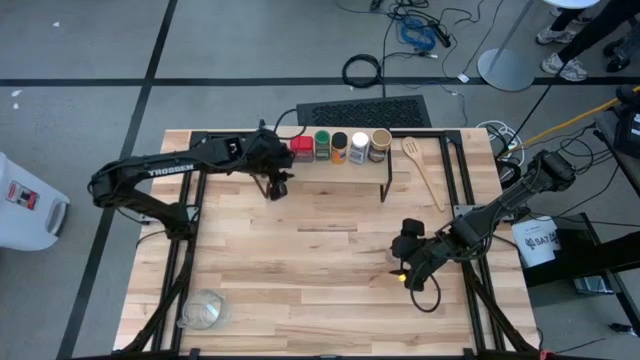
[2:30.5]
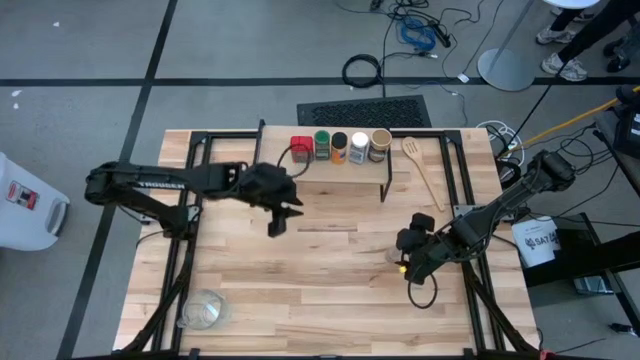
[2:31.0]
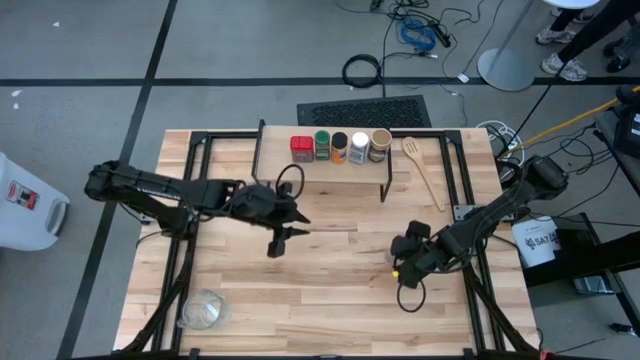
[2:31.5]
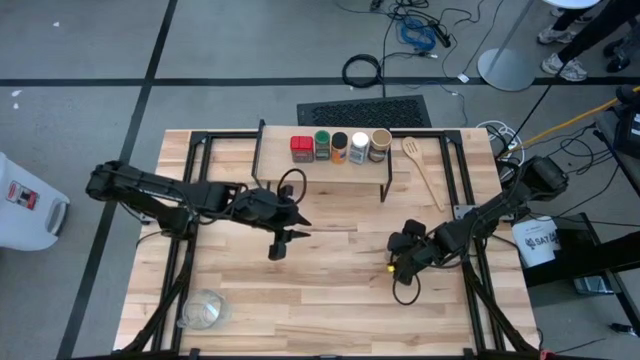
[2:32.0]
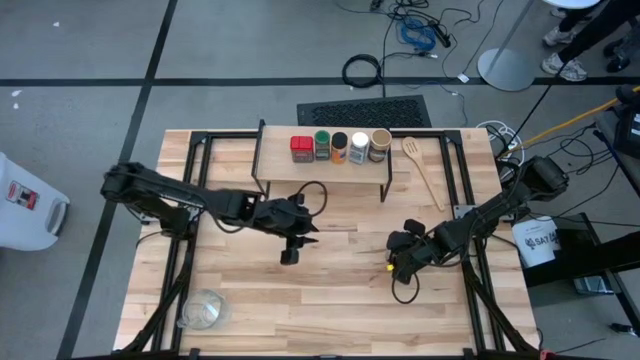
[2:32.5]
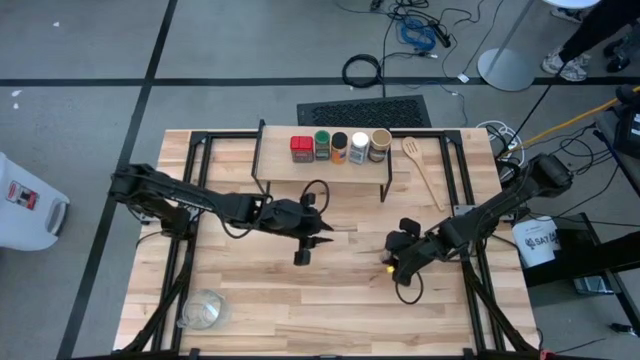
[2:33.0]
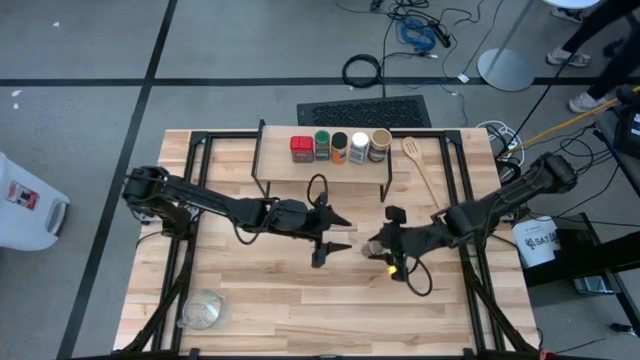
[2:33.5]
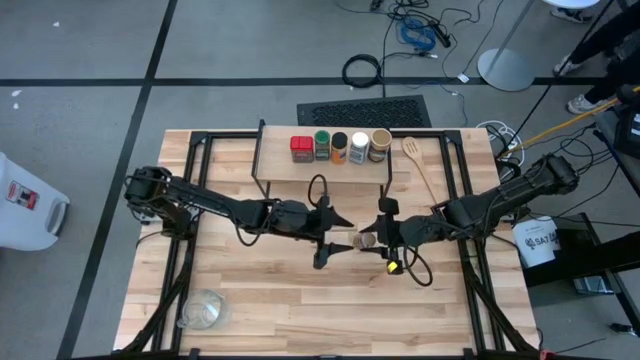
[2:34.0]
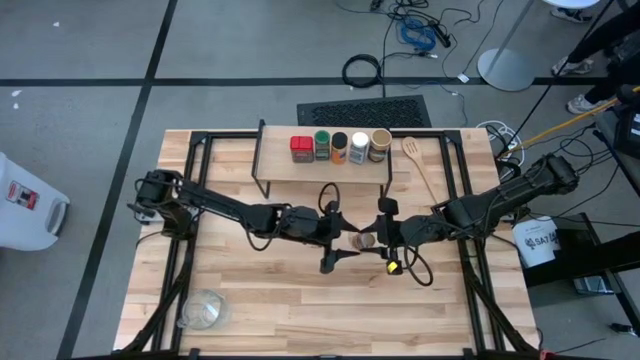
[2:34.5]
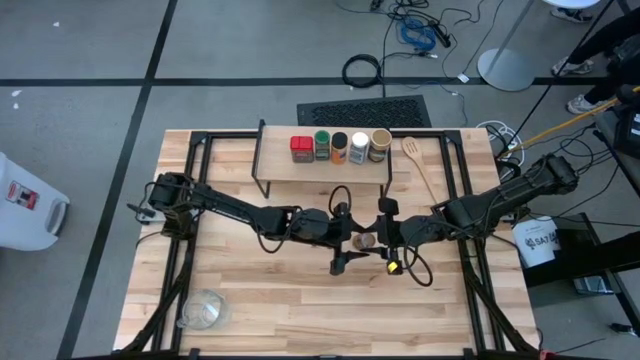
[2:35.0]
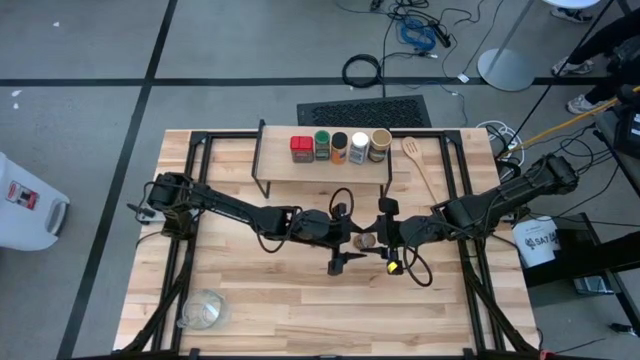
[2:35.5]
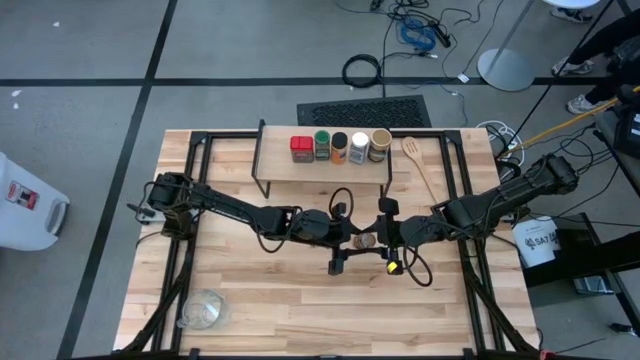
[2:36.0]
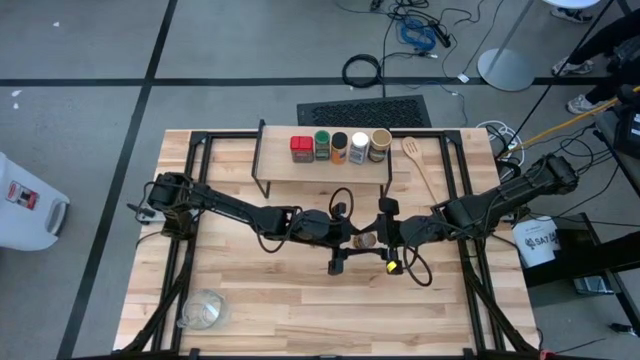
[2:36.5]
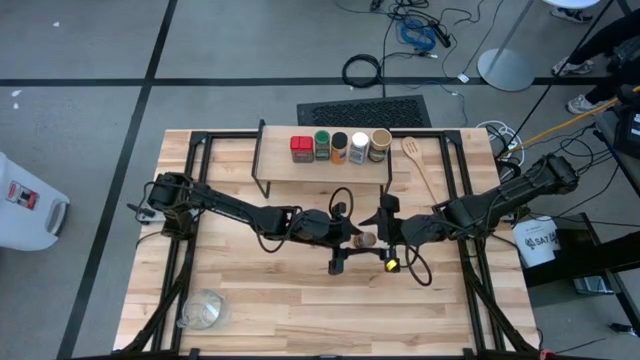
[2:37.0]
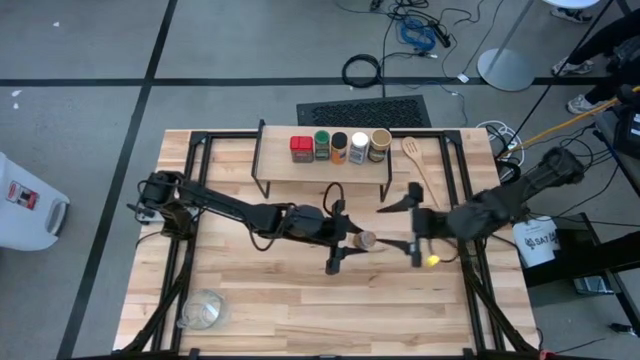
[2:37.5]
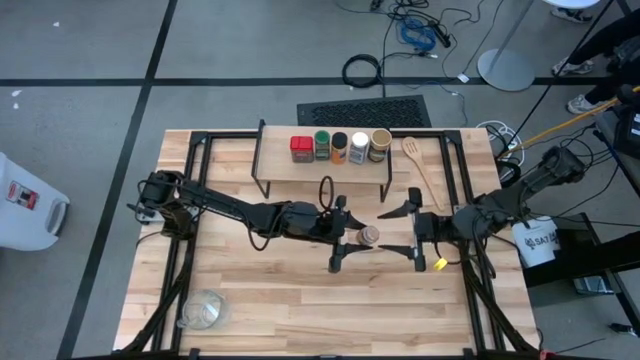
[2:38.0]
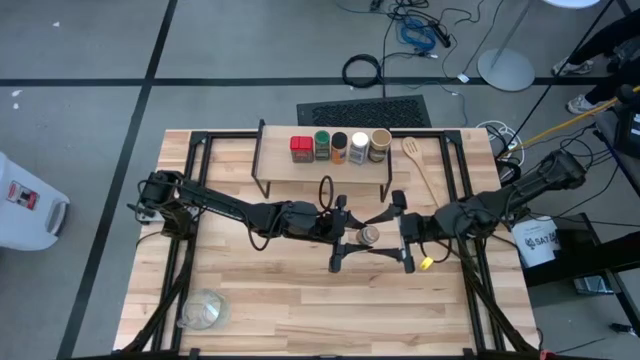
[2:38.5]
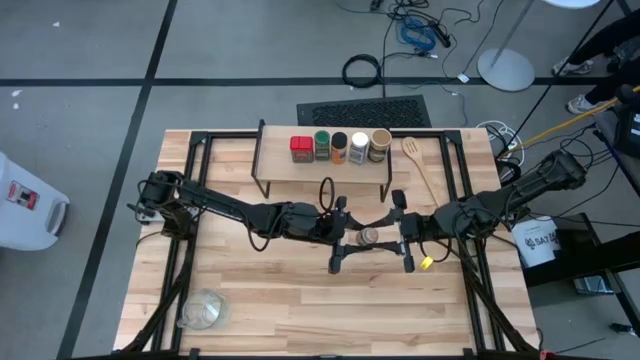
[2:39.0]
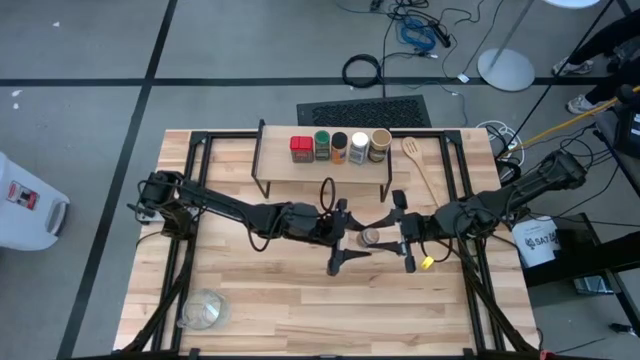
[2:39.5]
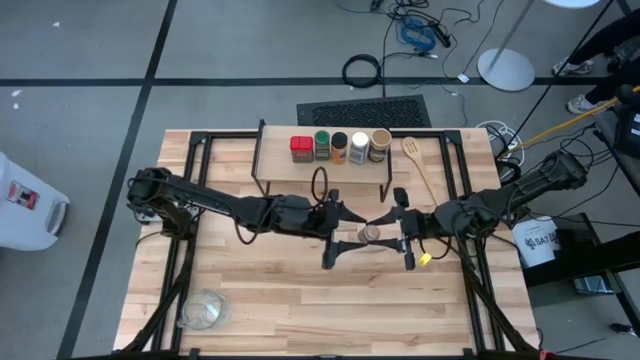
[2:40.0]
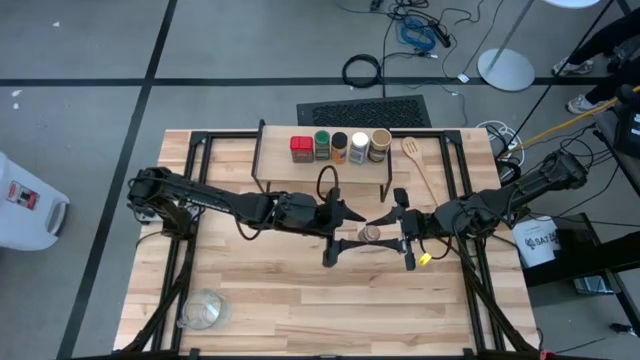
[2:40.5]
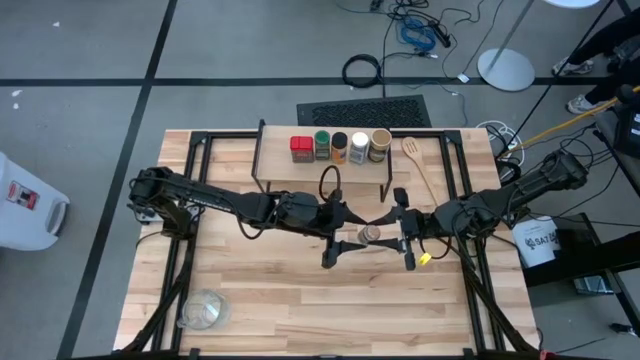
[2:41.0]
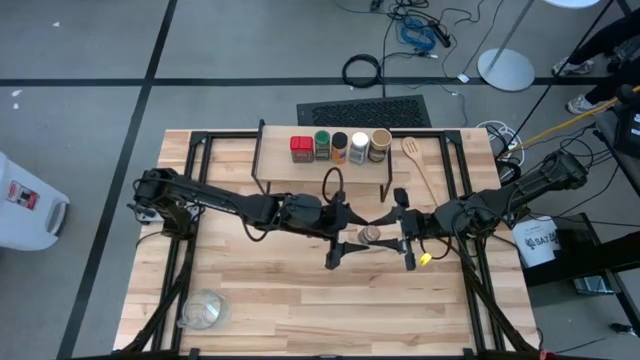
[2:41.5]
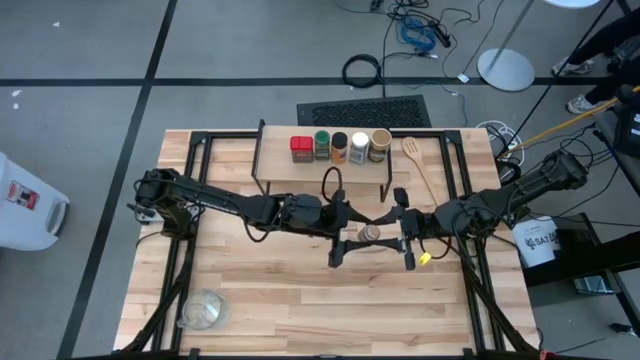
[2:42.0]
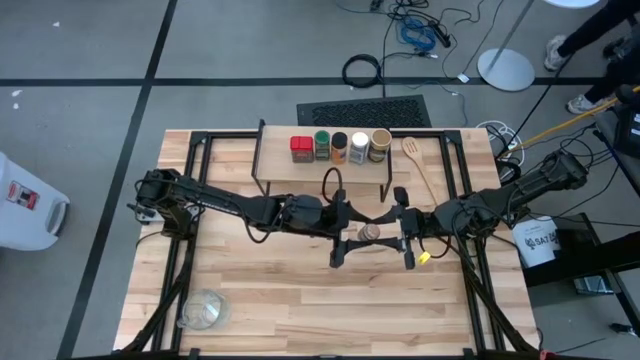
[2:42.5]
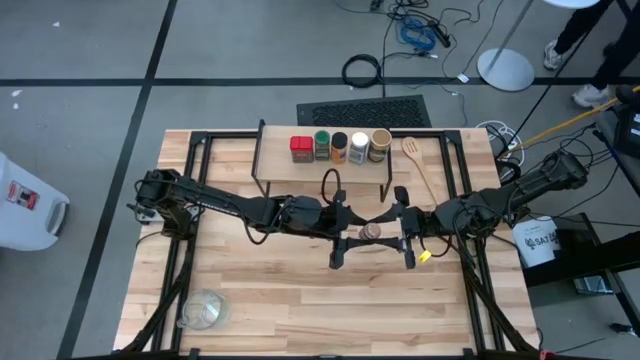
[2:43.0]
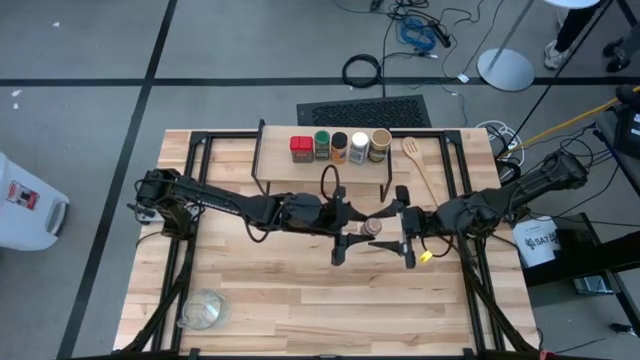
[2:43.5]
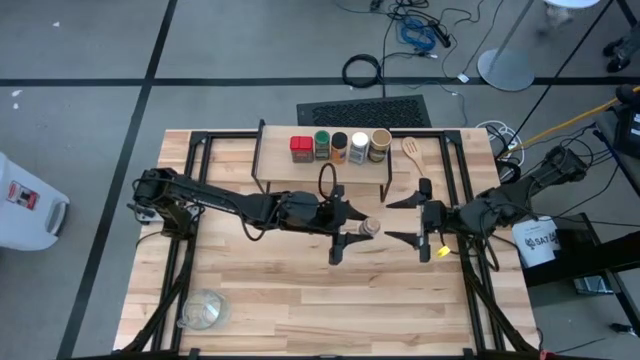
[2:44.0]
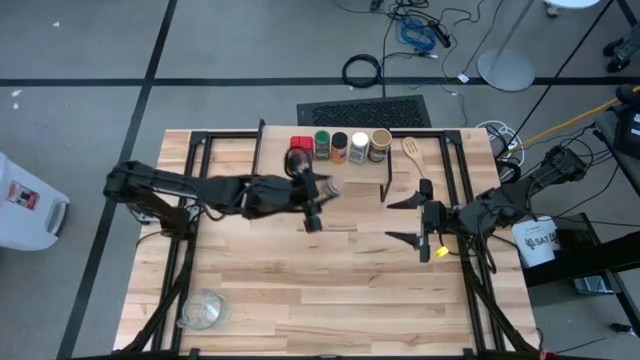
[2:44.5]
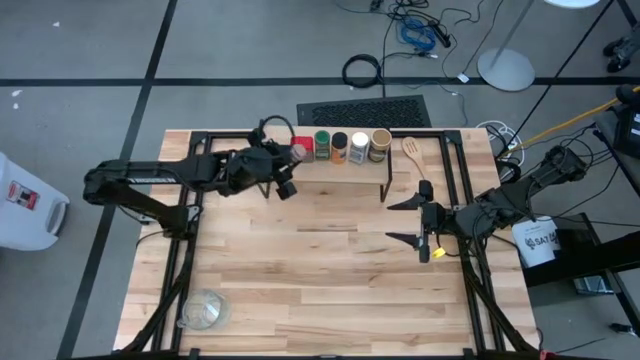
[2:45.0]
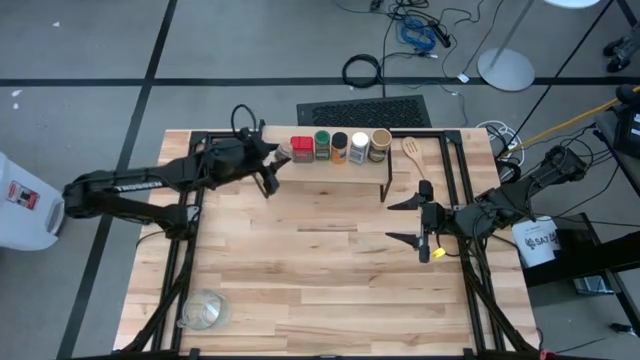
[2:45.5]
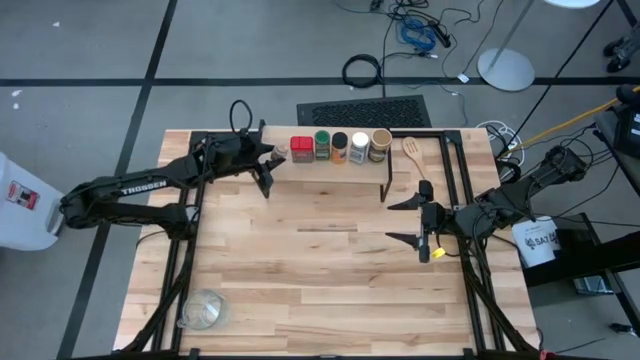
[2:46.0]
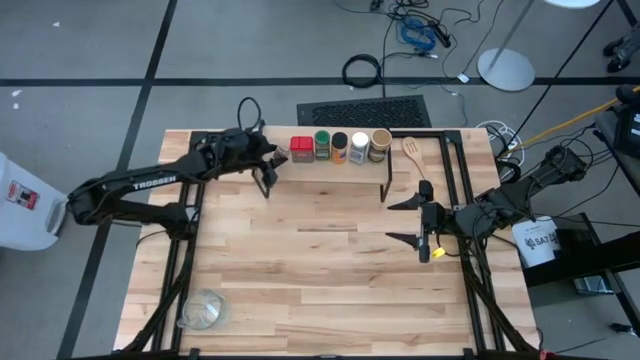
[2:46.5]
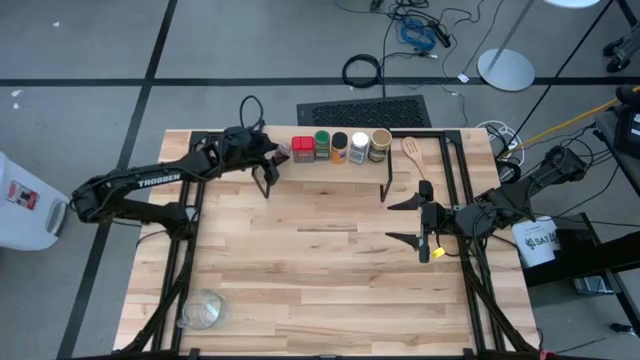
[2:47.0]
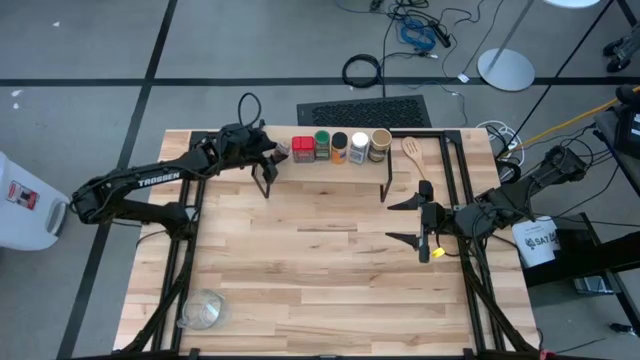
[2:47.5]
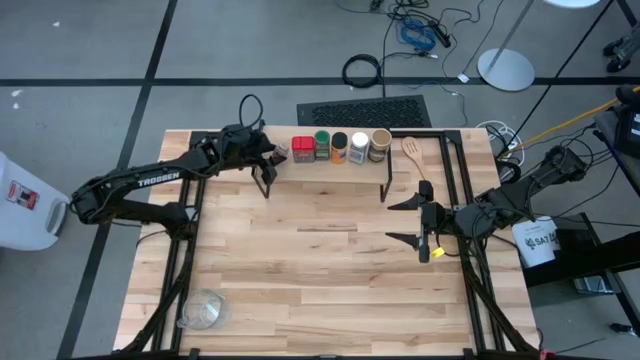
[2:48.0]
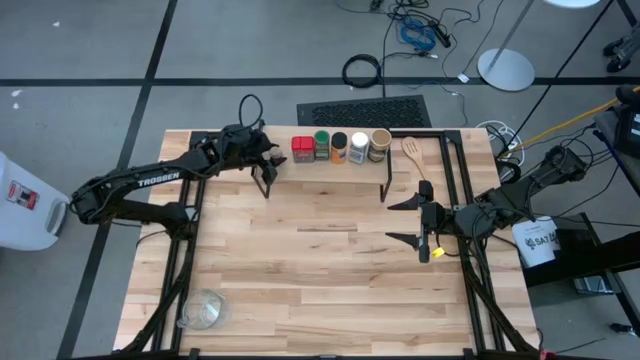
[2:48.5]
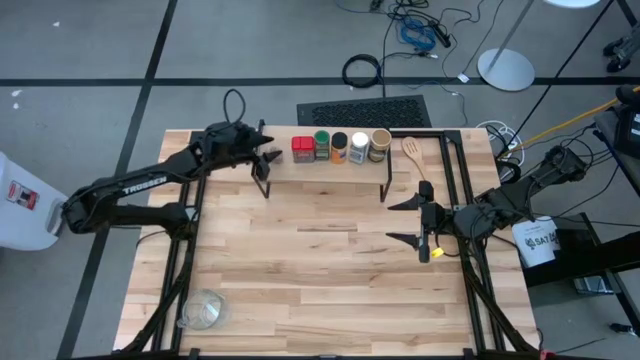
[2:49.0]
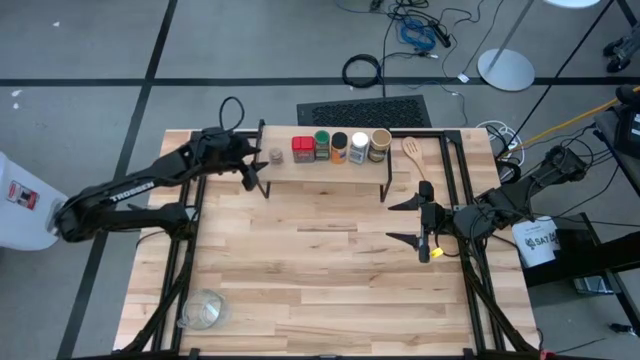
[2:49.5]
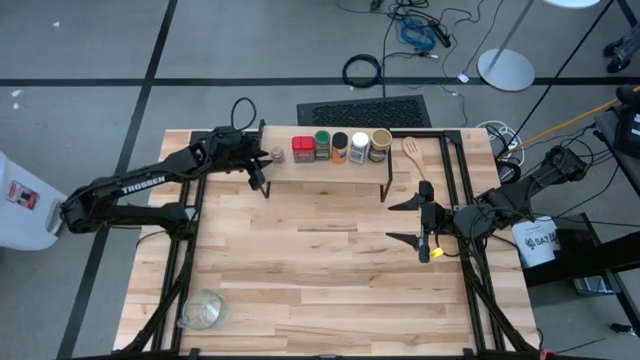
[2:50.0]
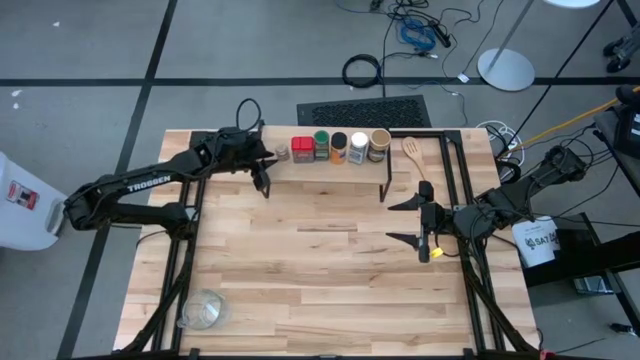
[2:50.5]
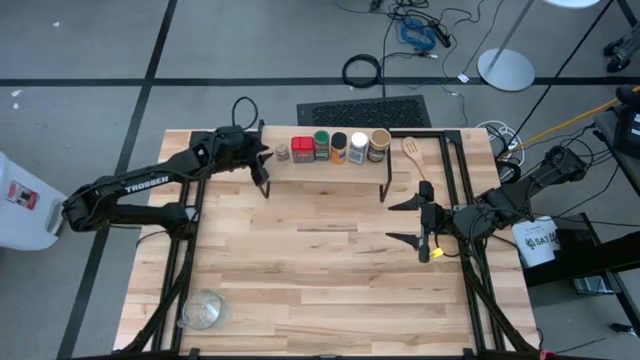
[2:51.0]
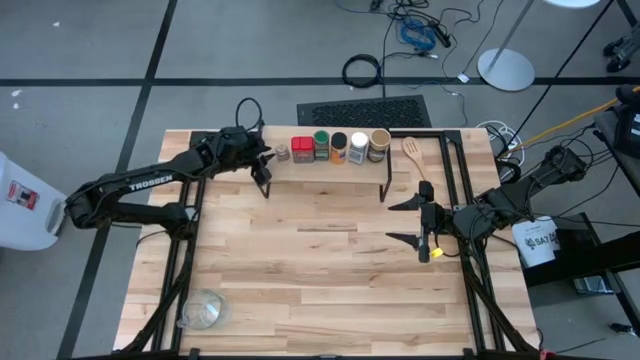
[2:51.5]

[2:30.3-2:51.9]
Task: Shelf spices
Put the brown seasoning bottle on the shelf
